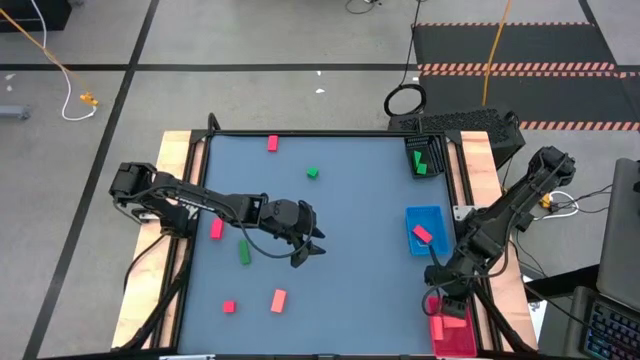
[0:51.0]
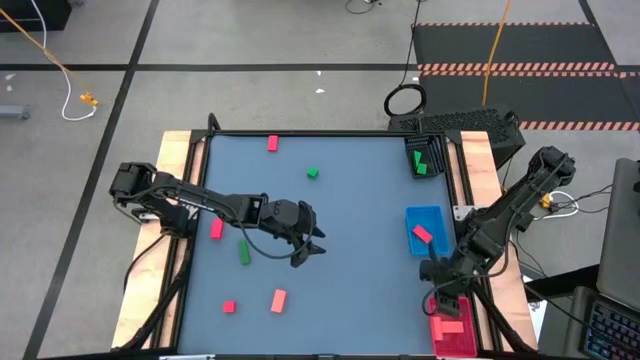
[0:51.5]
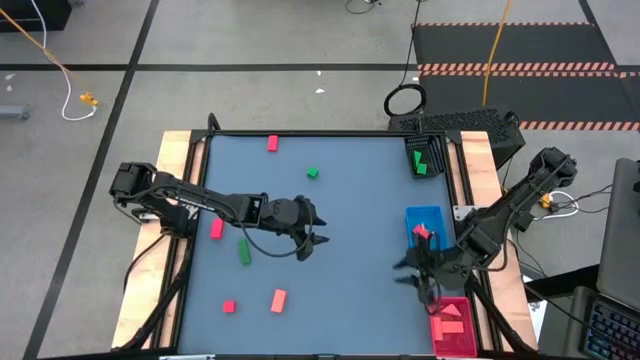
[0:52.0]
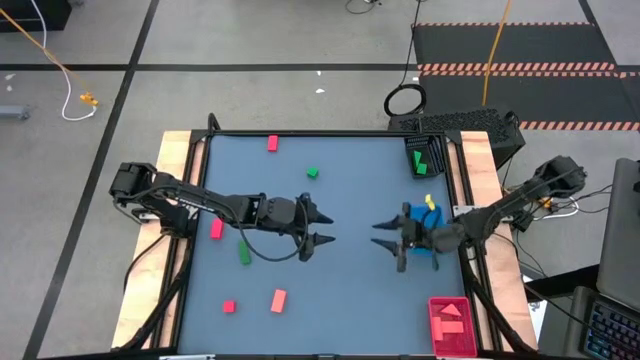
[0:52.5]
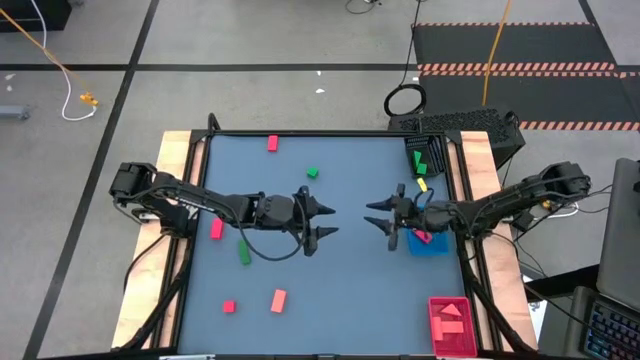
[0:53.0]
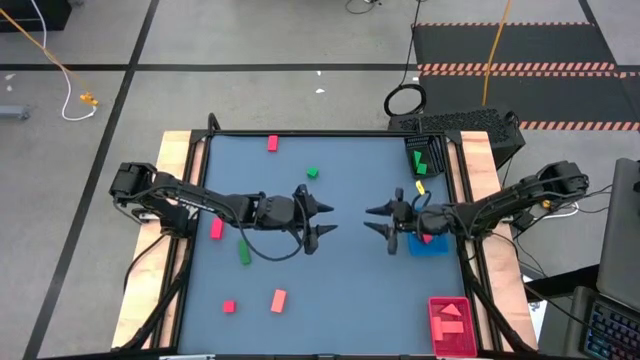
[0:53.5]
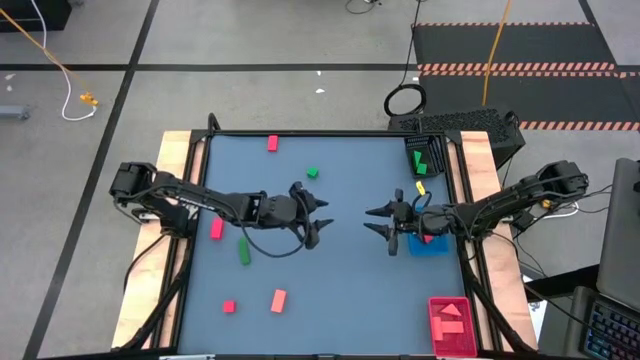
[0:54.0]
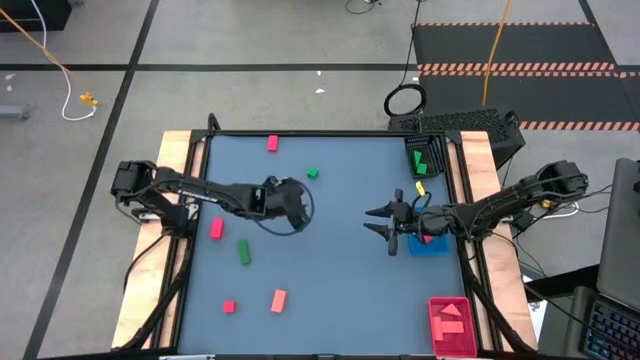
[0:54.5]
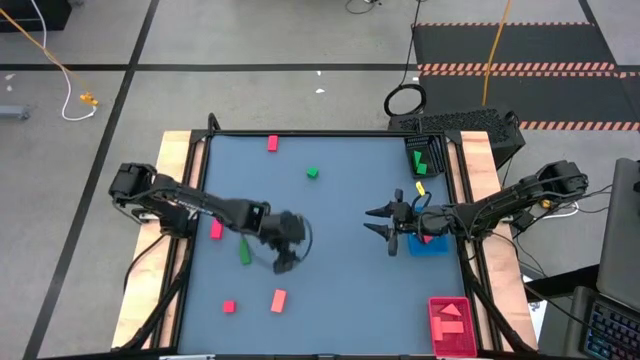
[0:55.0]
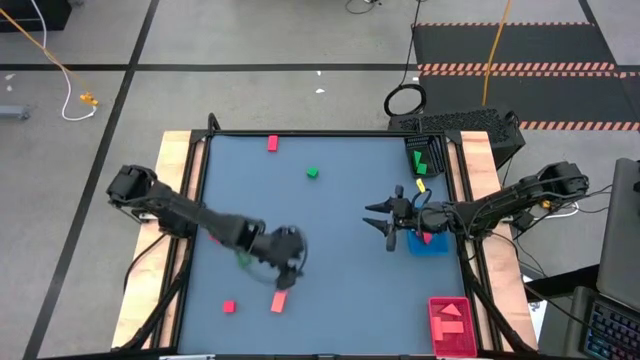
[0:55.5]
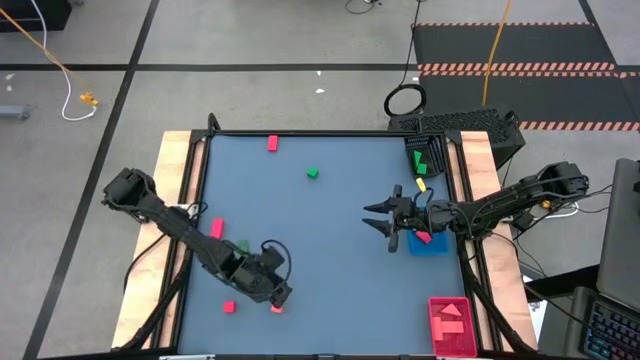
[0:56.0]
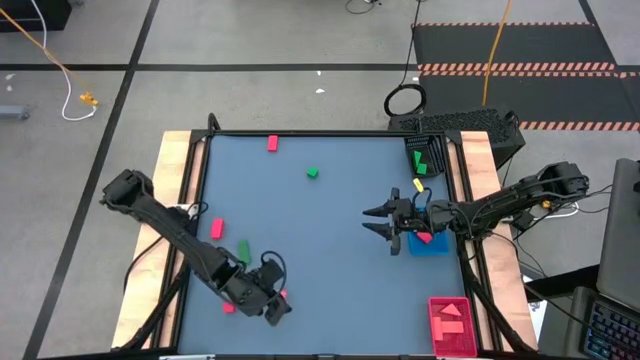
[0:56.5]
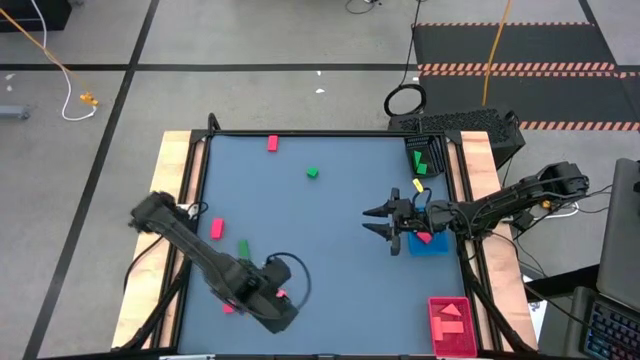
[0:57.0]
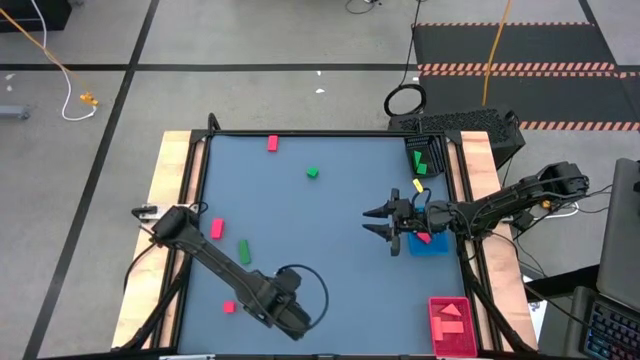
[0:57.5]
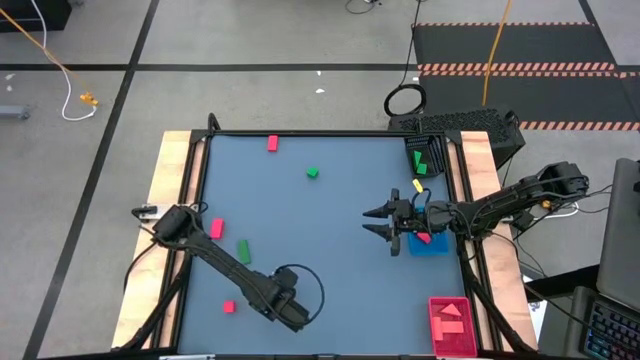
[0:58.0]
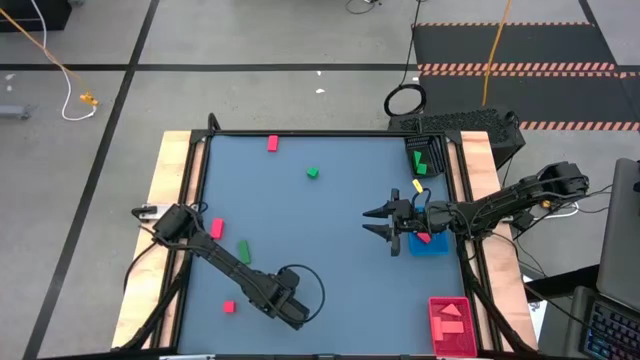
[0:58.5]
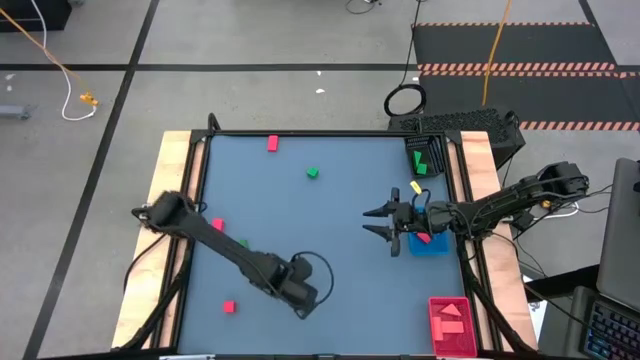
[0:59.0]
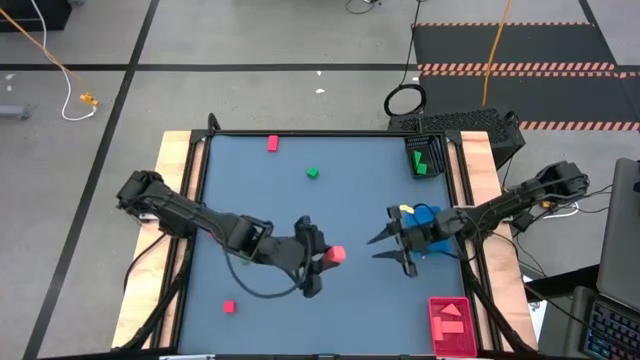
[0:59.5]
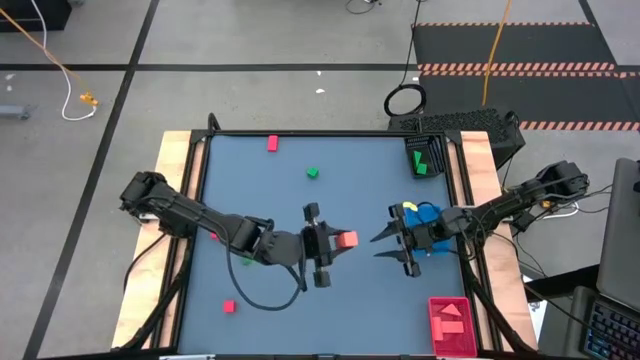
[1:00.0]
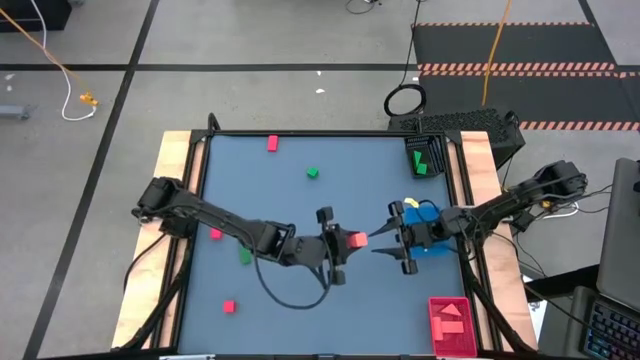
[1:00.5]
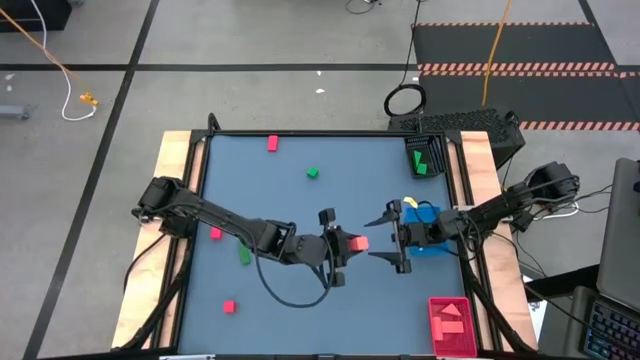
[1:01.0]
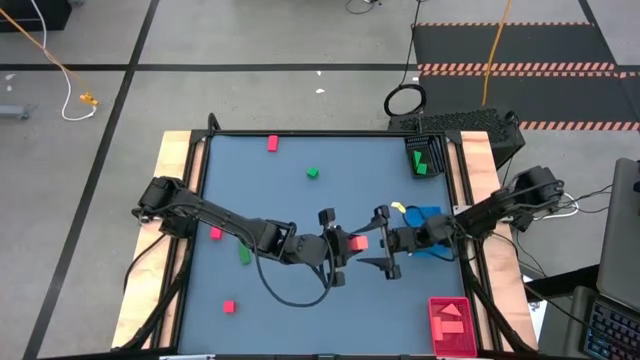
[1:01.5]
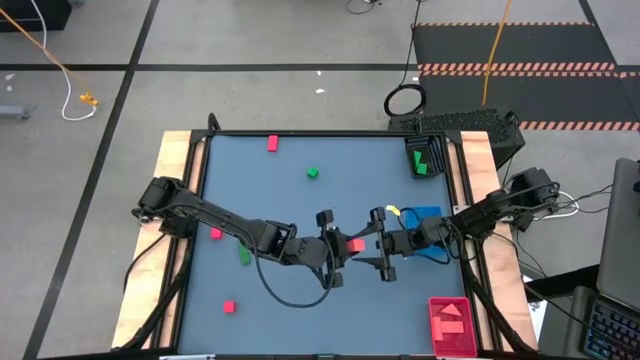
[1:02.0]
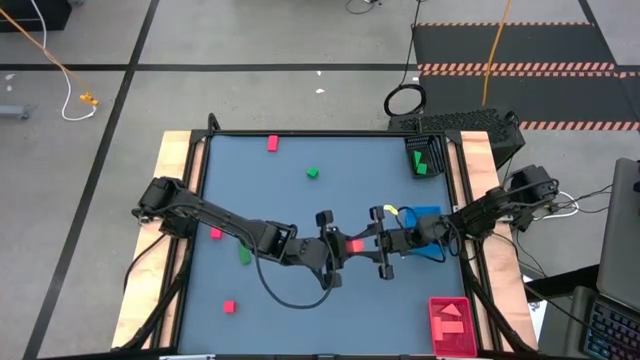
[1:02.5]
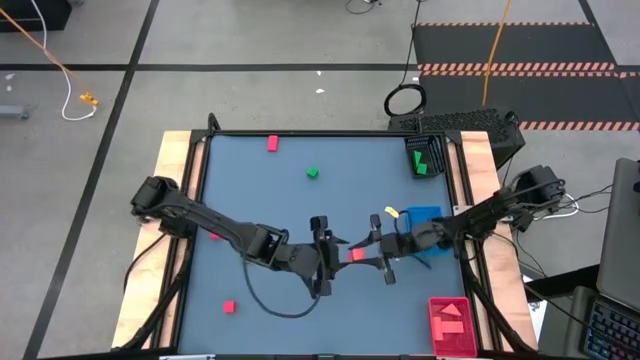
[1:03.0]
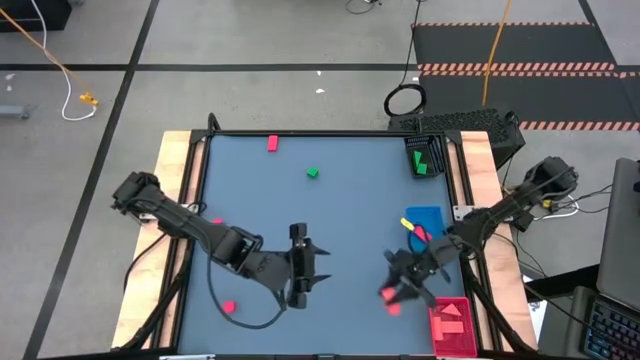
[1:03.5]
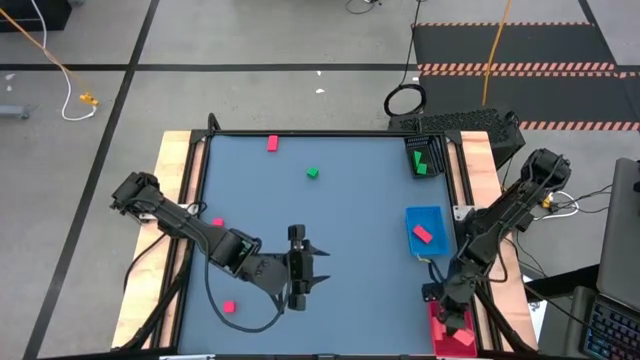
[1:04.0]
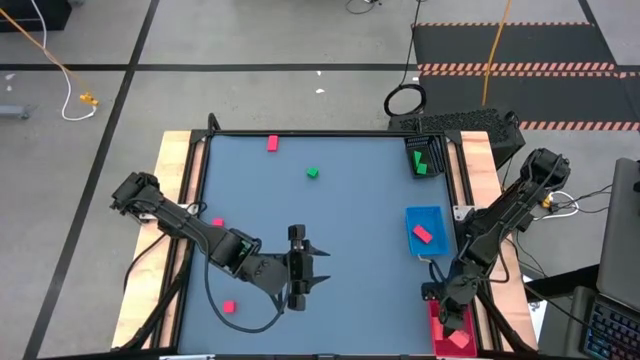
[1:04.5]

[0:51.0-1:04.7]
Task: Sort & place blocks by color
Put the orange block into the red bin

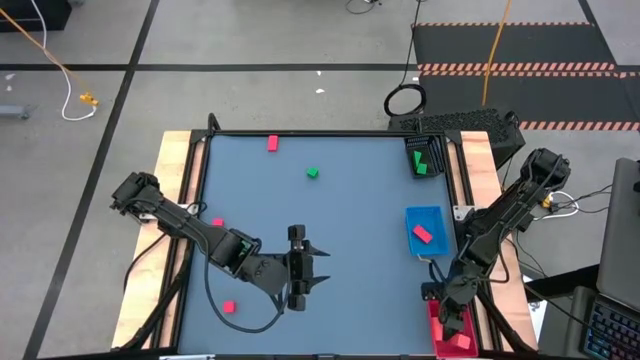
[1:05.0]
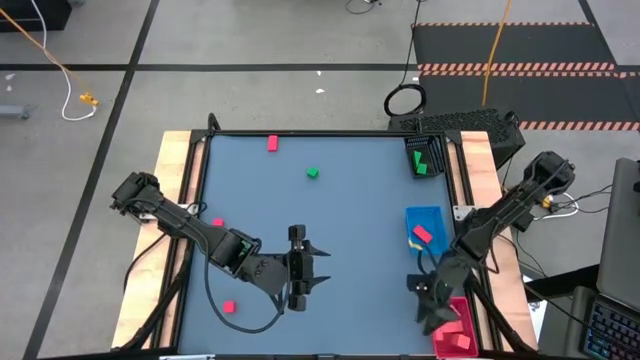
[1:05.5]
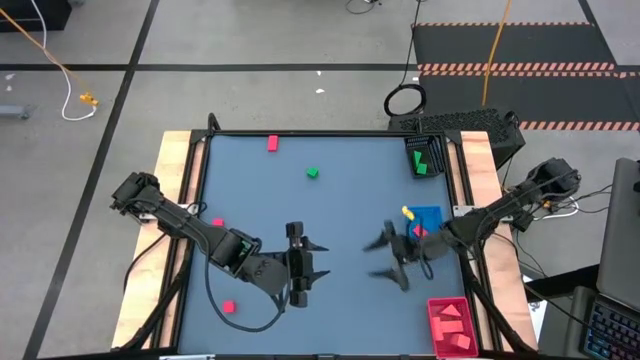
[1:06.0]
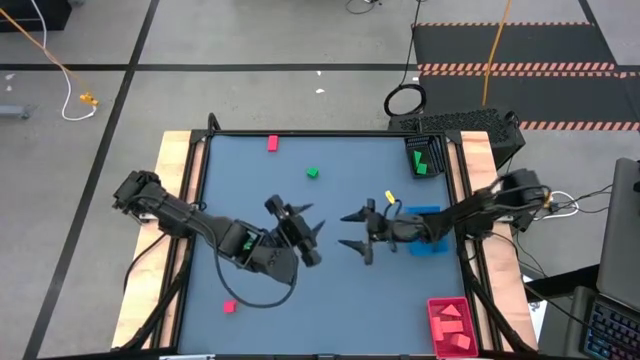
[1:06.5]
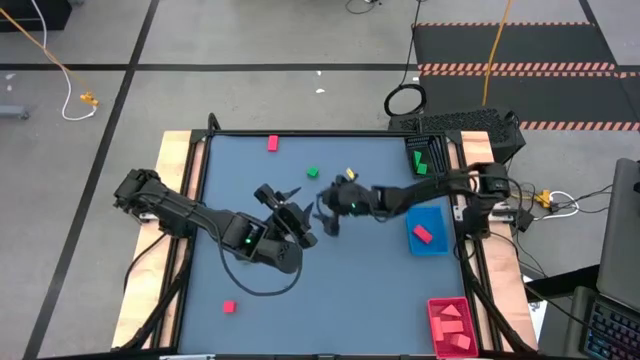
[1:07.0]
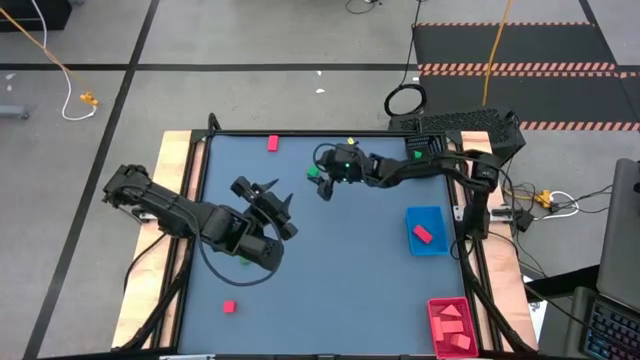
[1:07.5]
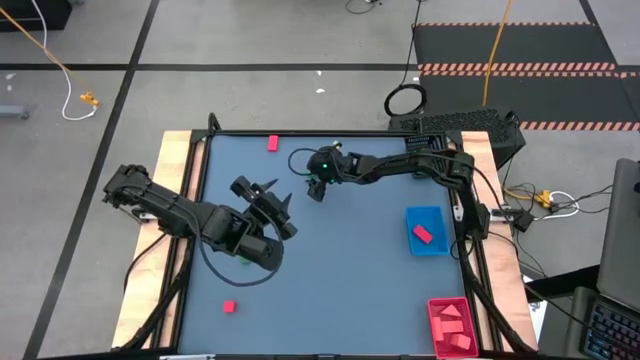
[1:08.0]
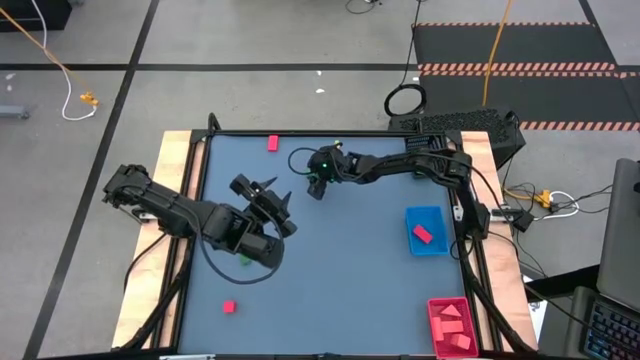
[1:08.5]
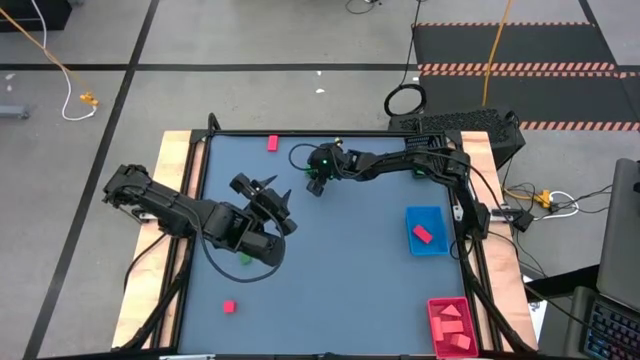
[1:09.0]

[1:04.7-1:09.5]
Put the green block into the black bin

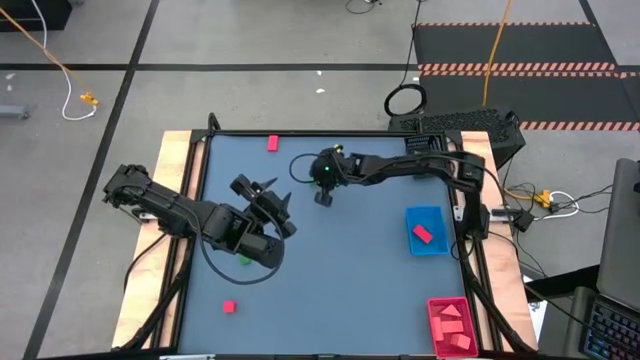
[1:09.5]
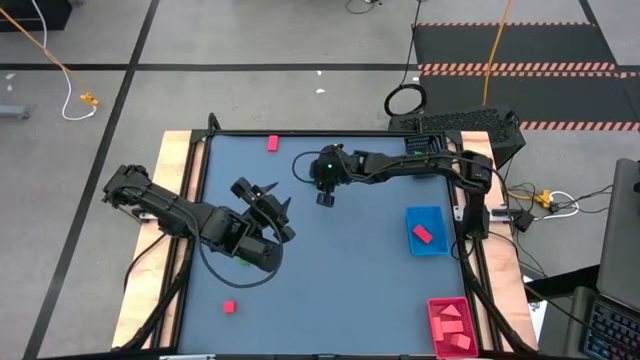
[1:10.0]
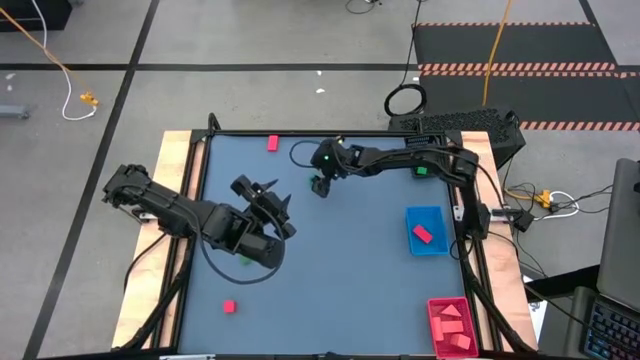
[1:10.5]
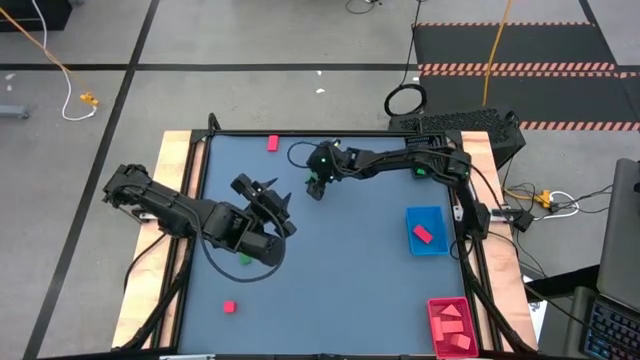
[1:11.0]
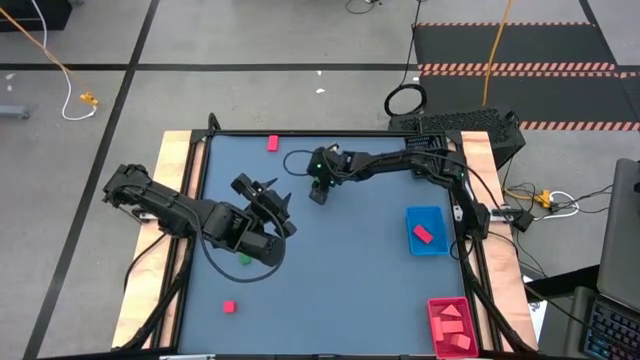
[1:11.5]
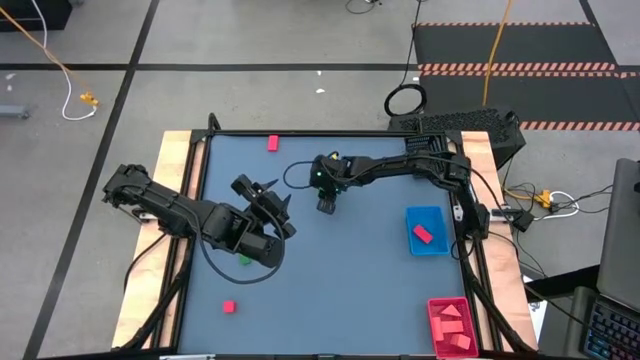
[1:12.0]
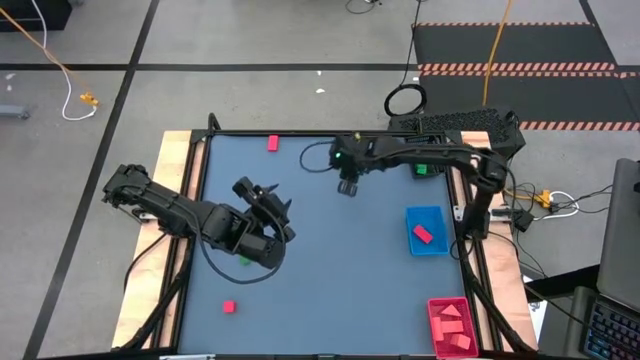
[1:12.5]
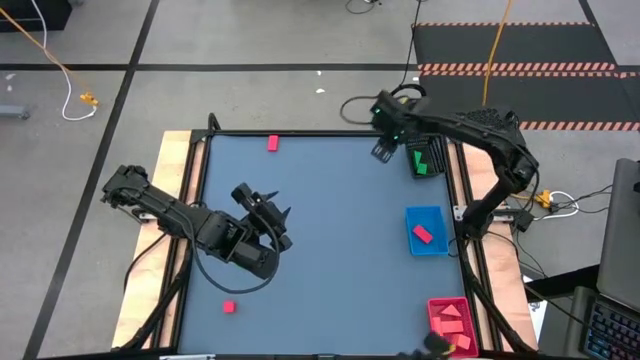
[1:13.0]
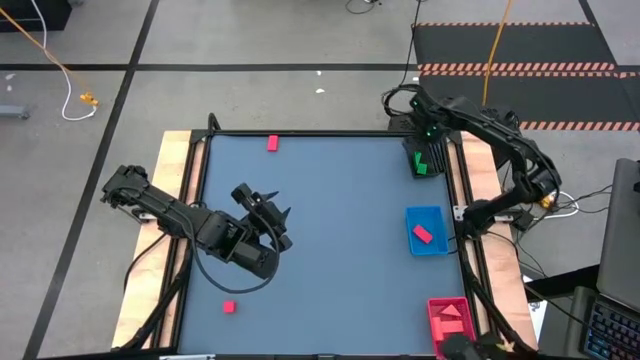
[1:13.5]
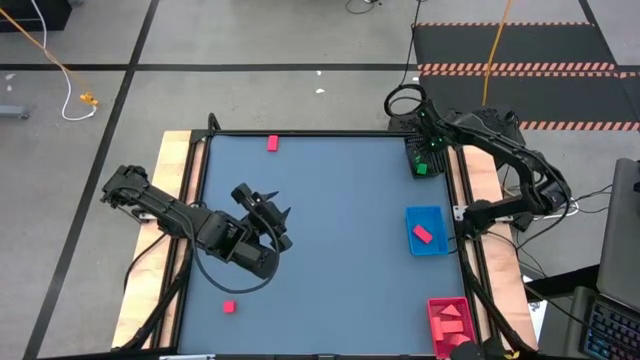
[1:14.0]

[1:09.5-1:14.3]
Put the green block into the black bin
